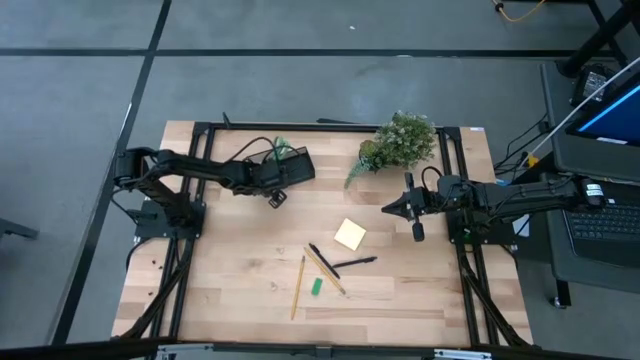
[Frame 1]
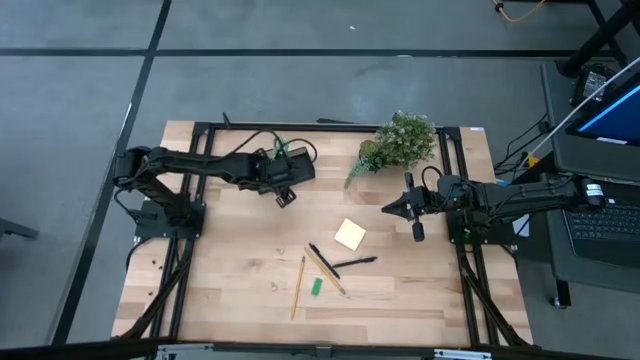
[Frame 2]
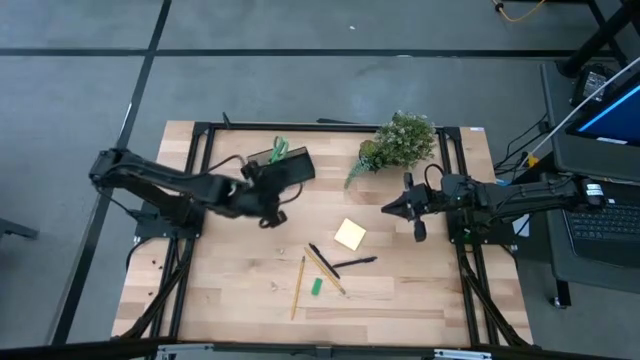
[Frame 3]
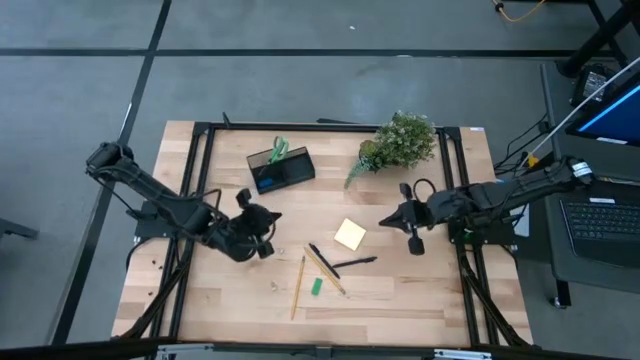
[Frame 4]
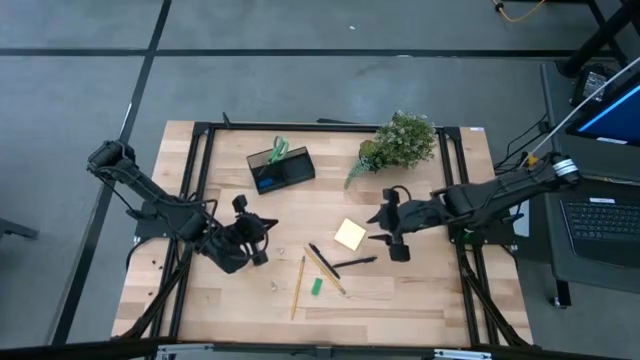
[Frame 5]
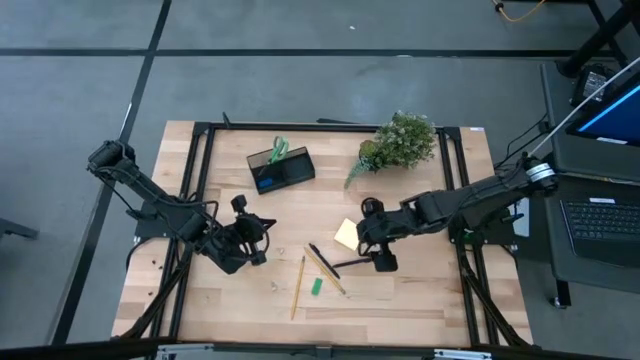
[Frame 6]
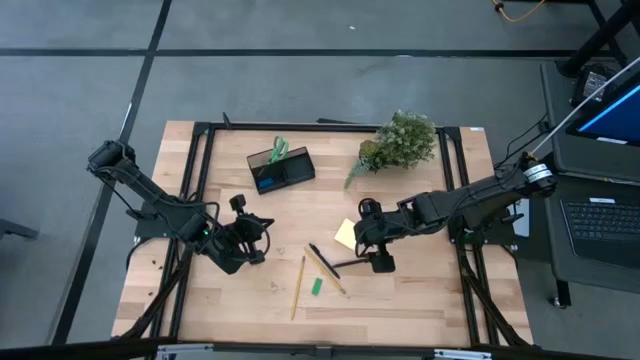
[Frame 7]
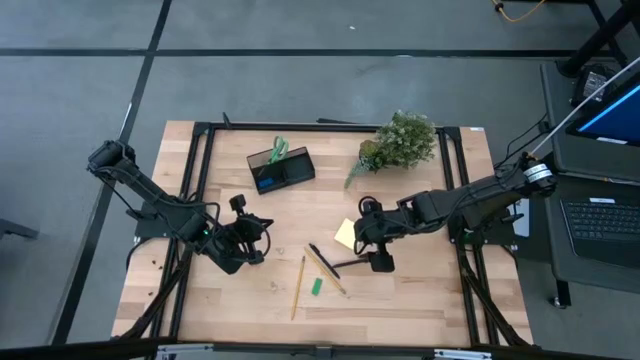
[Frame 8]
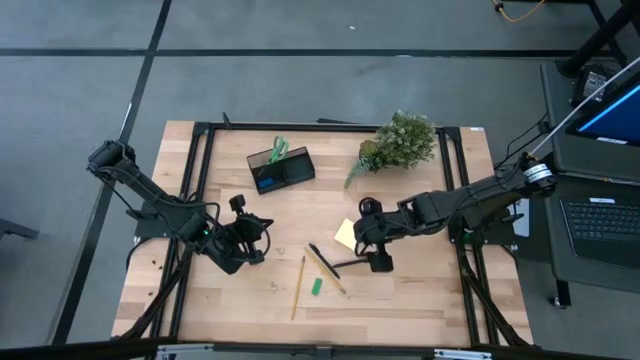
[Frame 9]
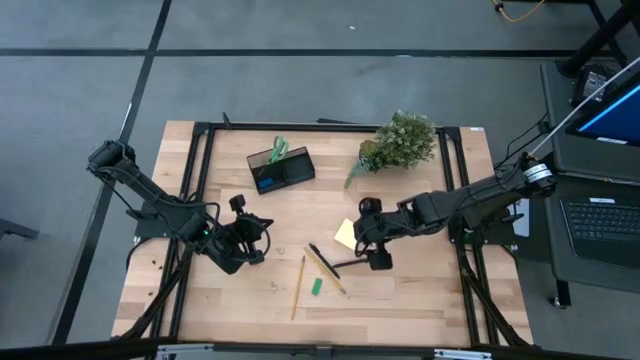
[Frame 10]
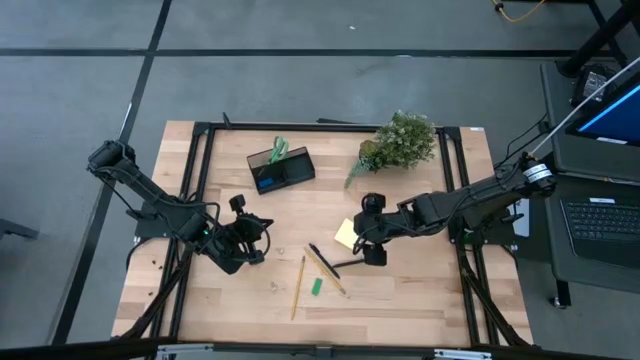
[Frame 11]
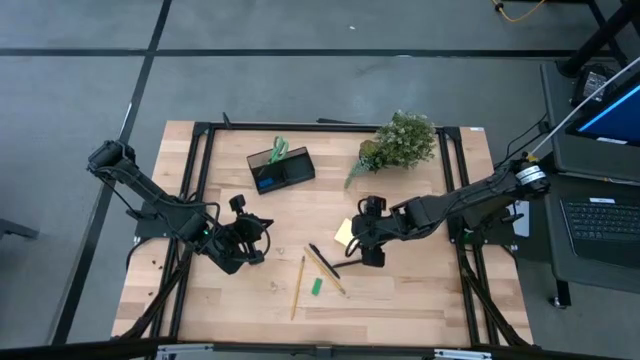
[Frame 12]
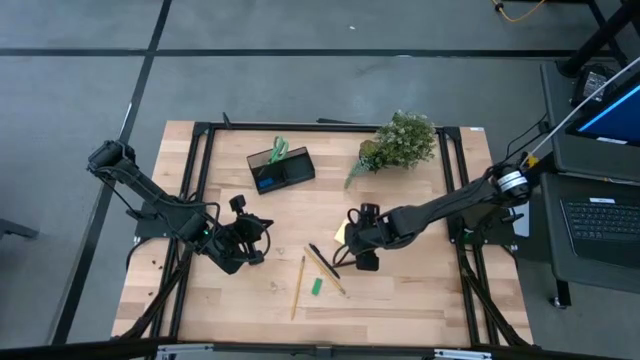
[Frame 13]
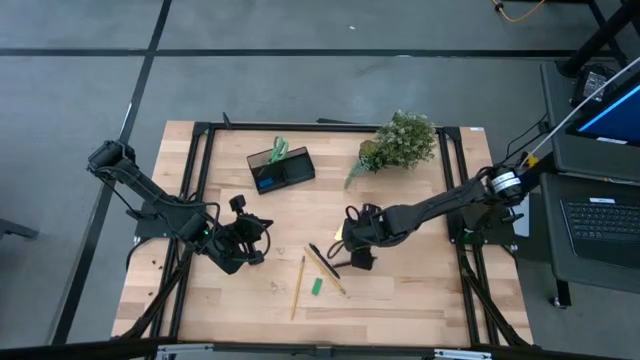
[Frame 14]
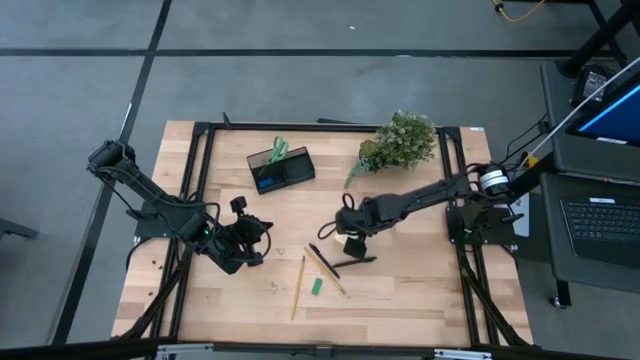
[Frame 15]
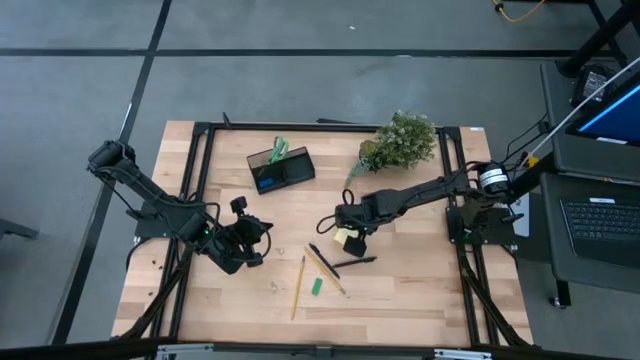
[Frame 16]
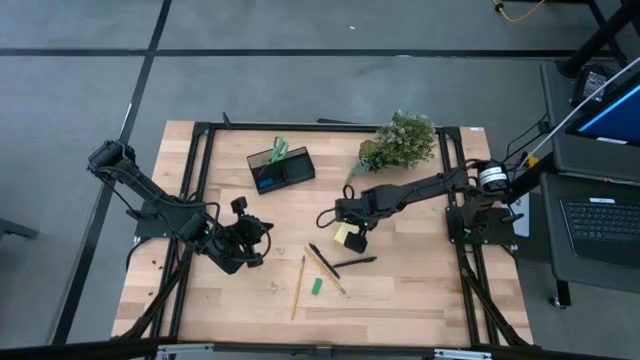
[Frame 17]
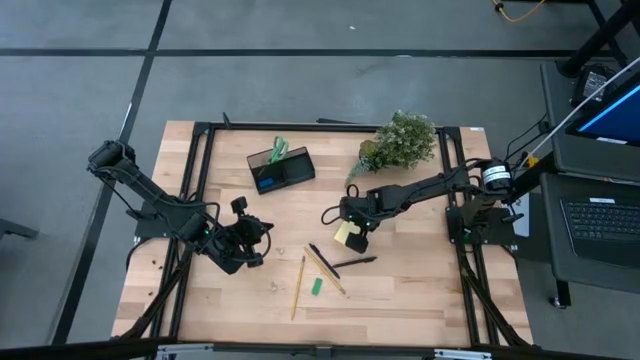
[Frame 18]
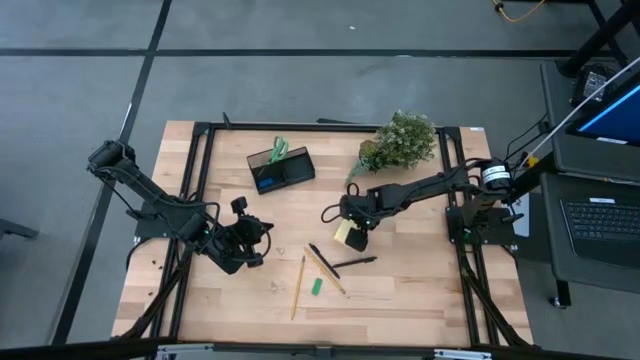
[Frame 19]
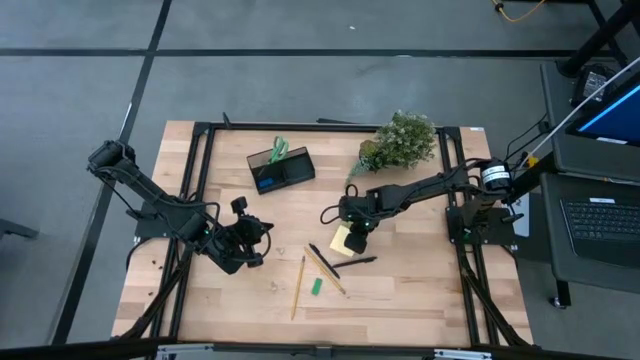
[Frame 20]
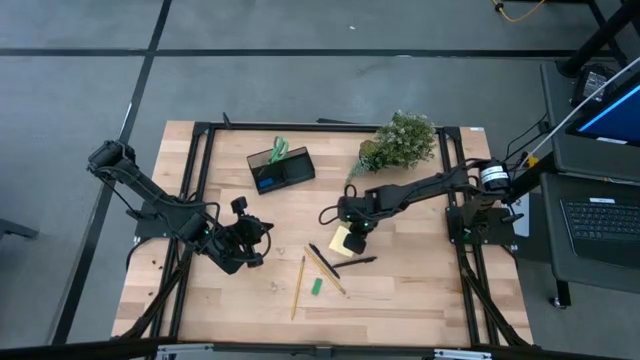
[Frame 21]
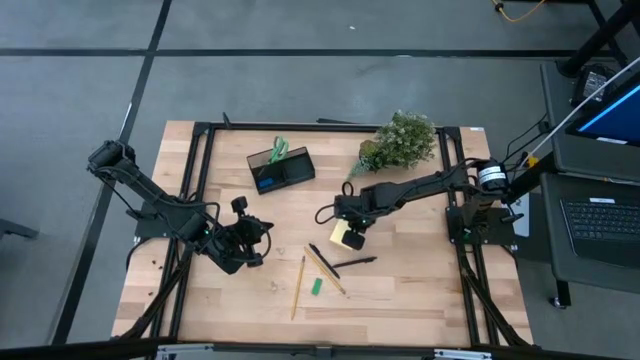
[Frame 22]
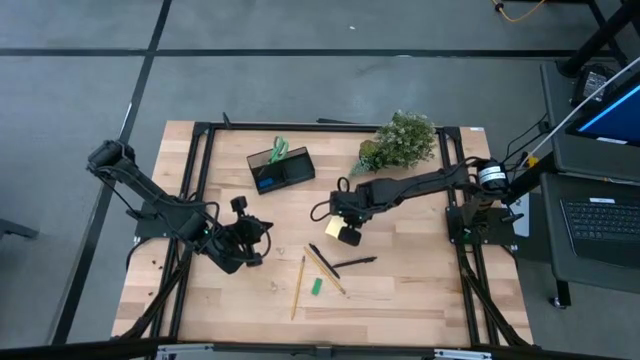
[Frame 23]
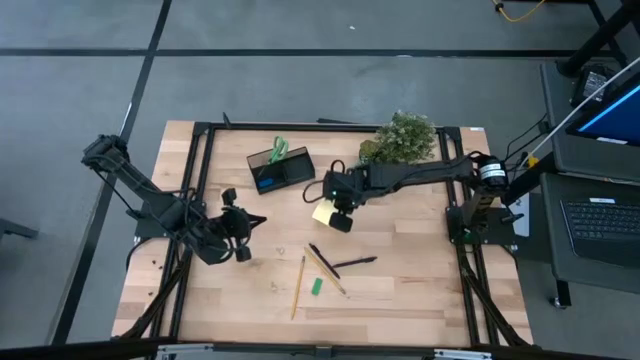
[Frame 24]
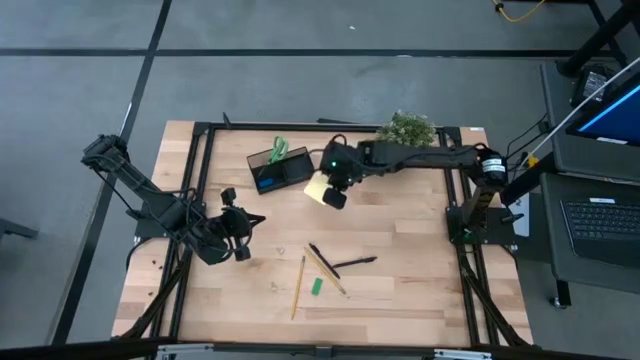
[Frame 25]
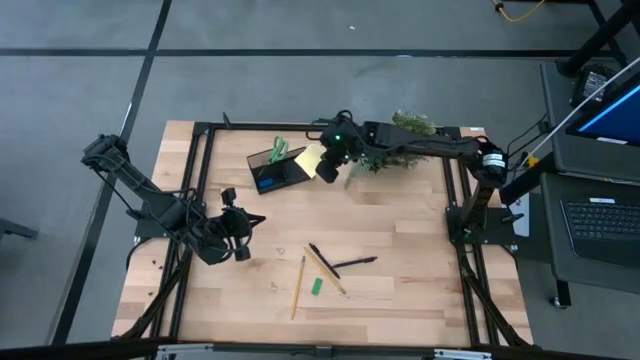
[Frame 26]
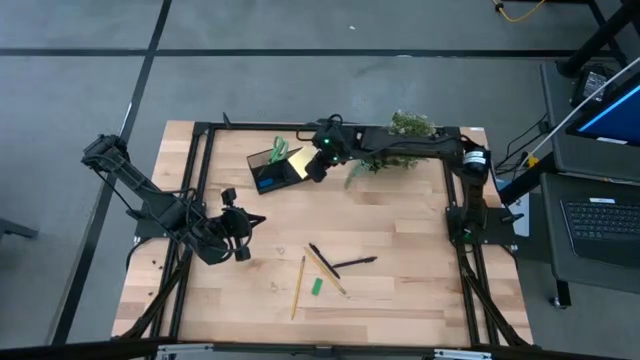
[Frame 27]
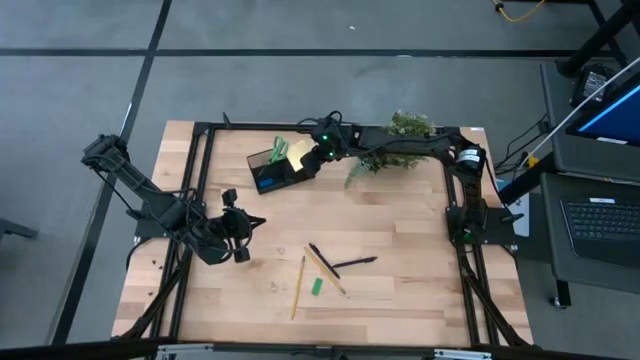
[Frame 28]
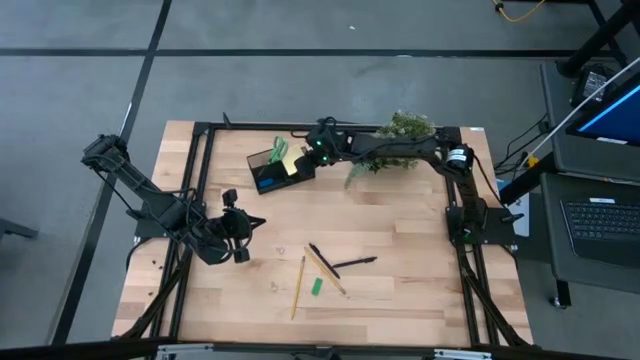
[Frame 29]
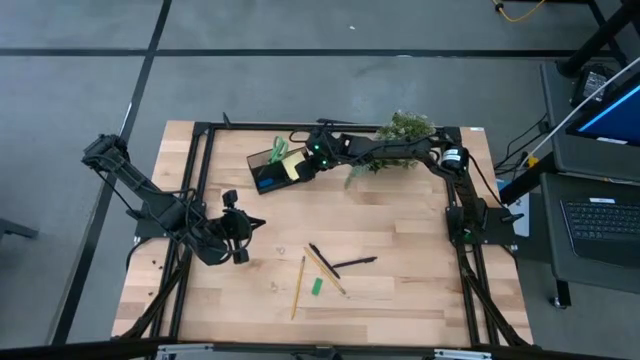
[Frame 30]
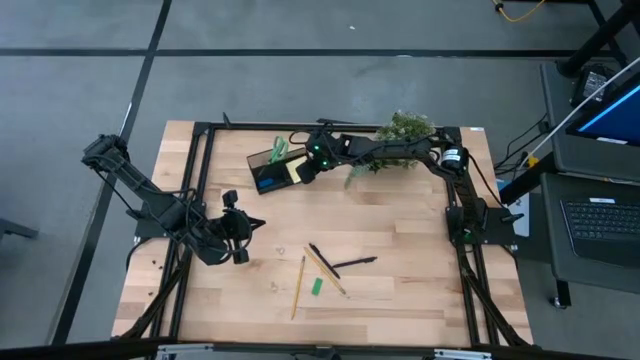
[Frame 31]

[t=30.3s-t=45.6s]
Task: Pick and place office supplies into organizer
Put the yellow sticky notes into the desk organizer

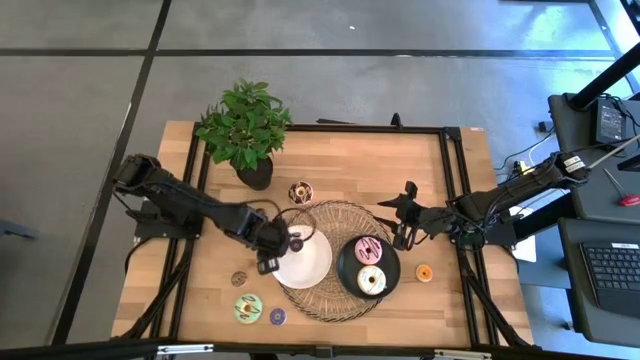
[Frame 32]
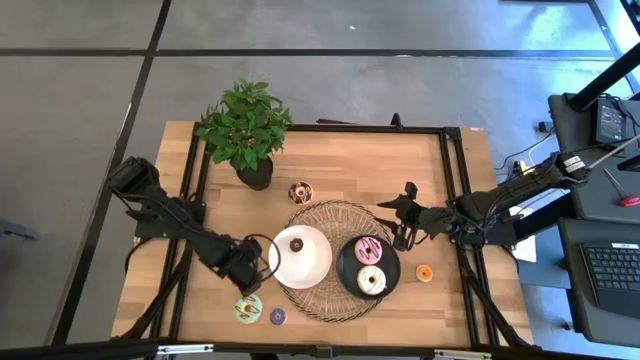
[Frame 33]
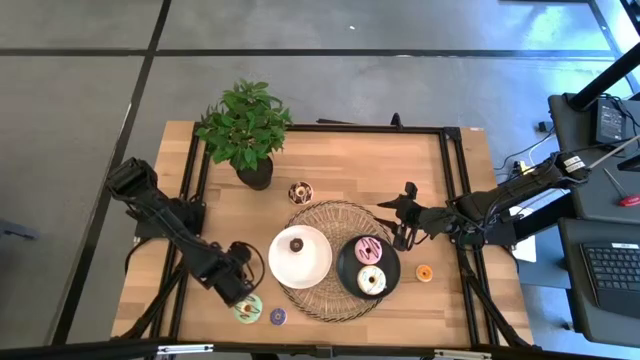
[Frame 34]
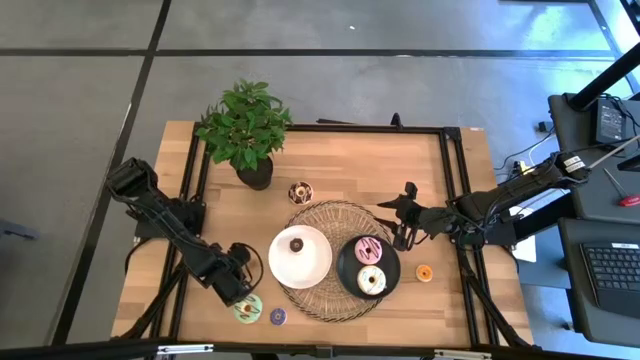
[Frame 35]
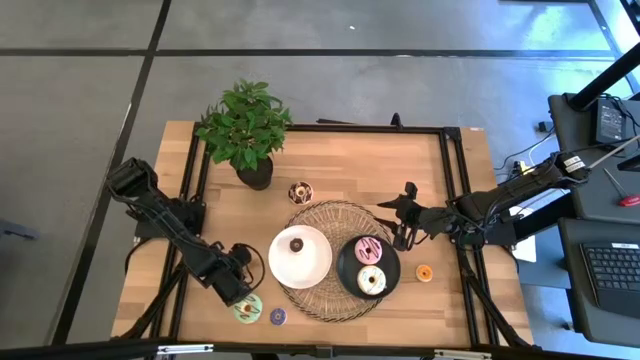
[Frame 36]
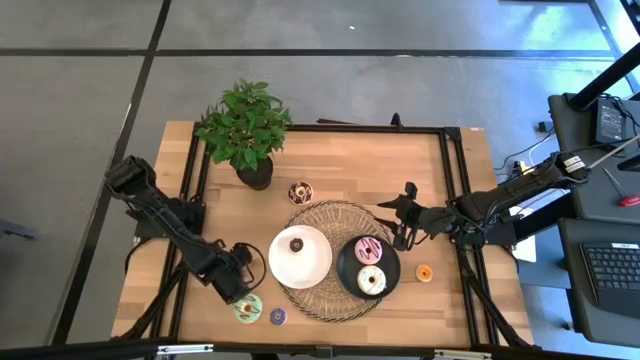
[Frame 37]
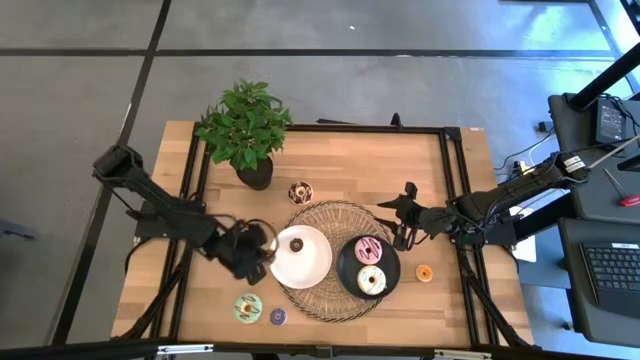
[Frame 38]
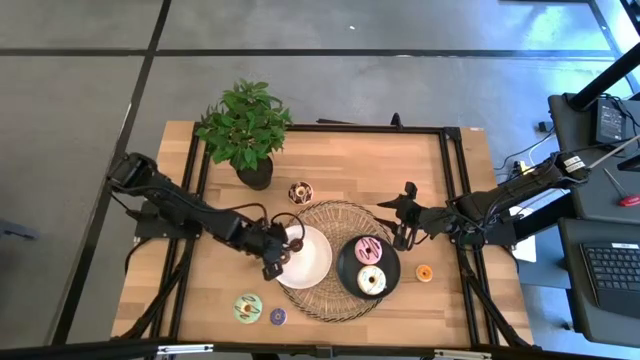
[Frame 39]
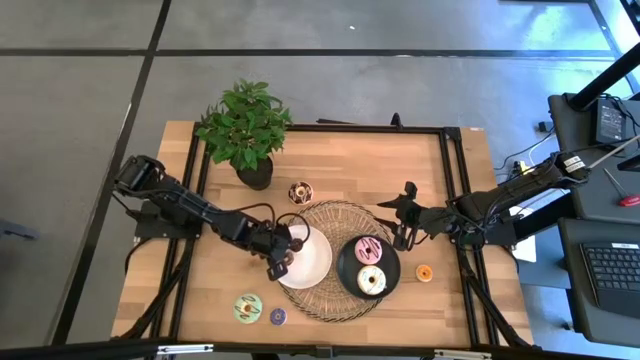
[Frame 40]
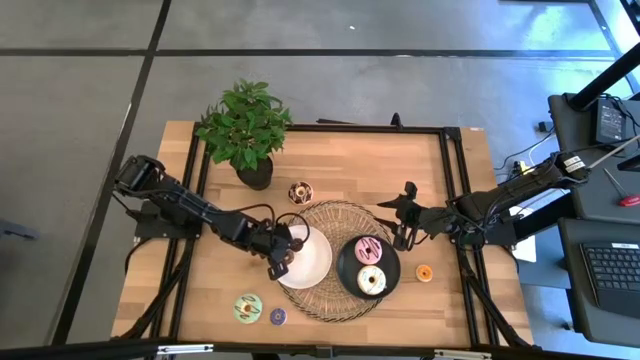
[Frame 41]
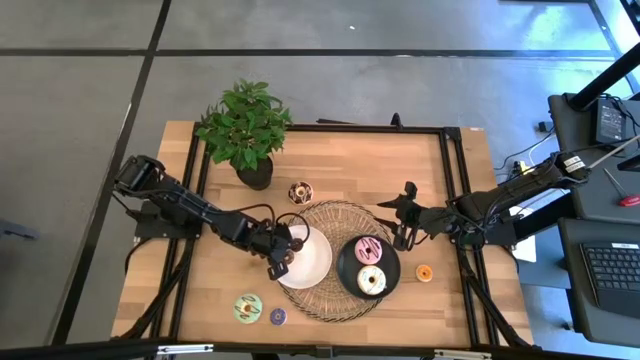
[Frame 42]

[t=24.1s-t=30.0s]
Task: Pick & Place donuts
Put the small brown donut on the white plate
